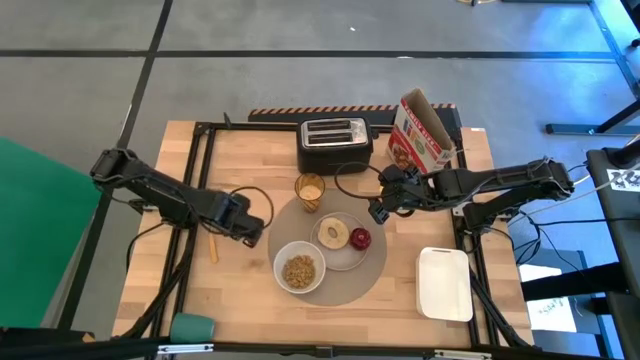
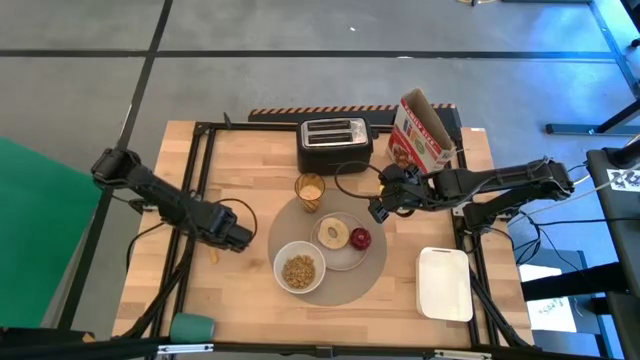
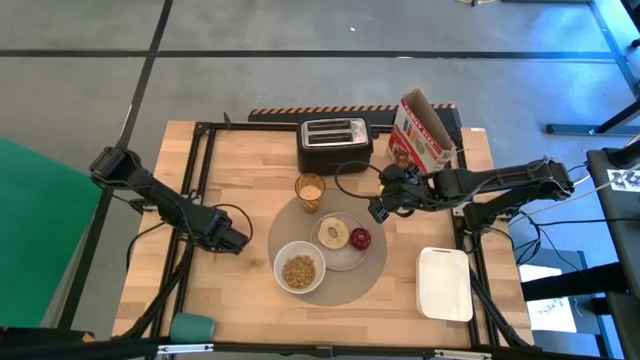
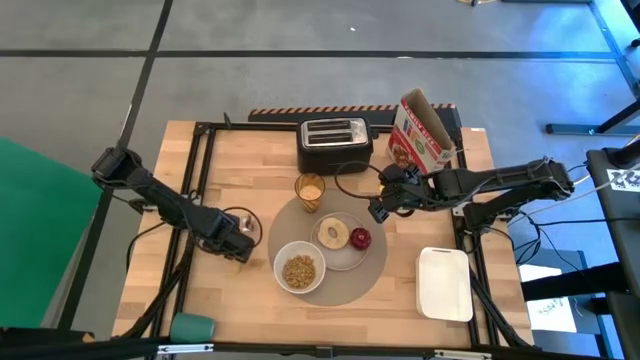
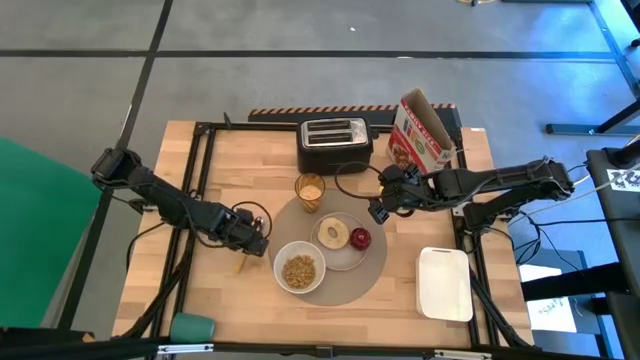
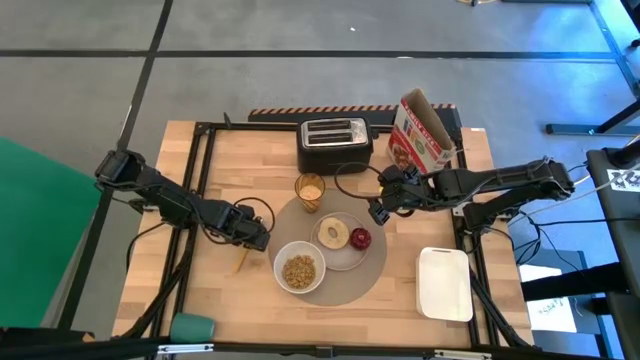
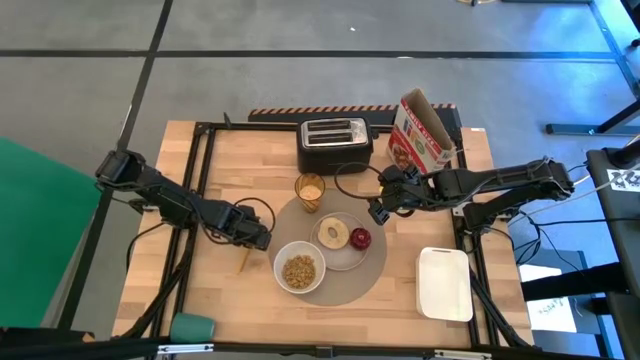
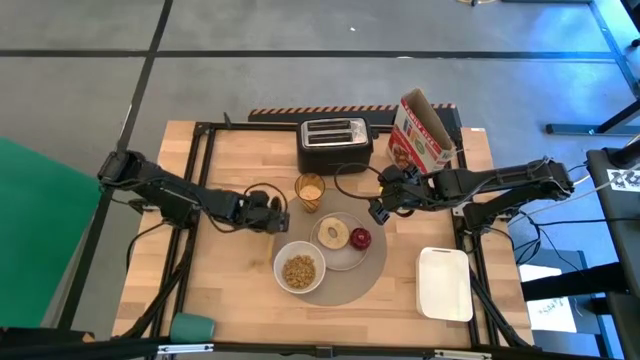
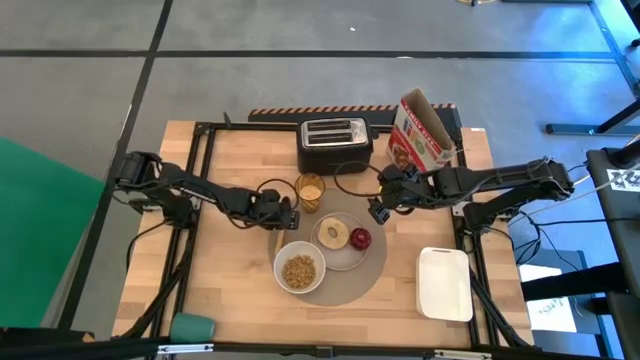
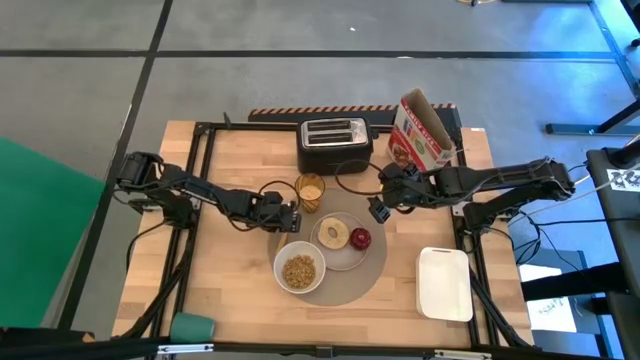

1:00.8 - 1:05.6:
Task: Arrange a breakfast setting
Put the yellow spoon on the gray table mat

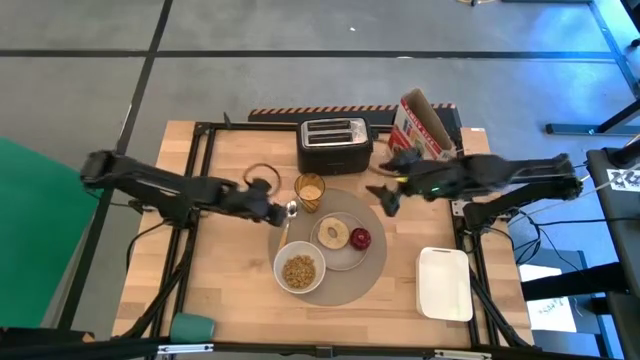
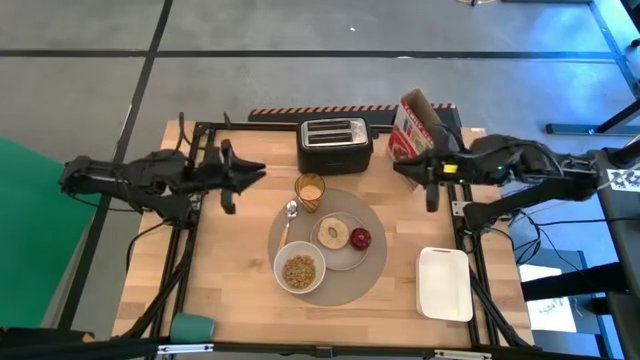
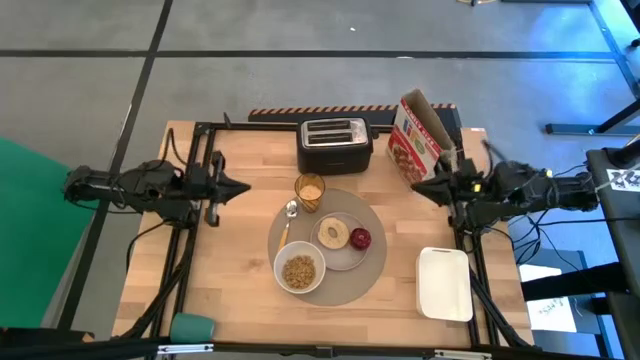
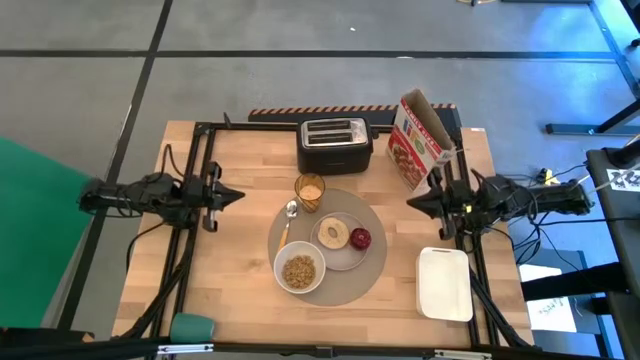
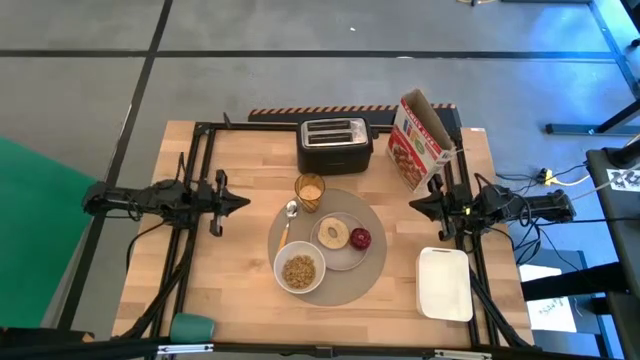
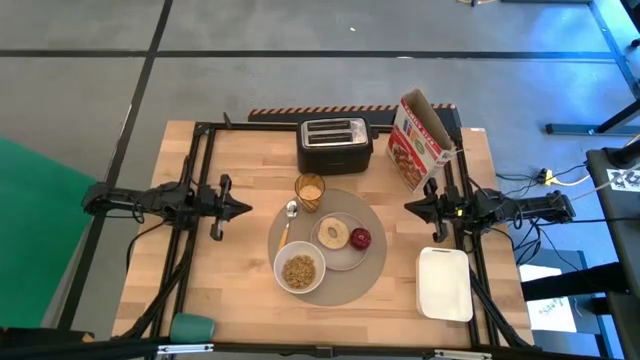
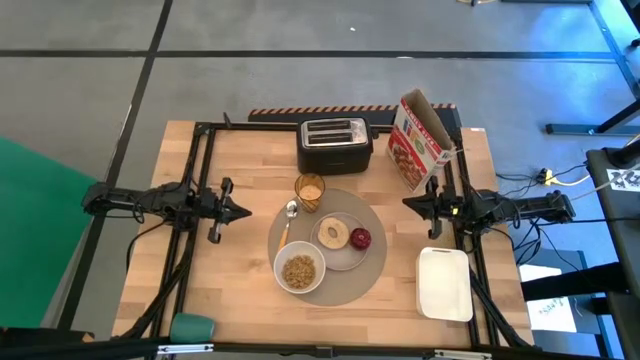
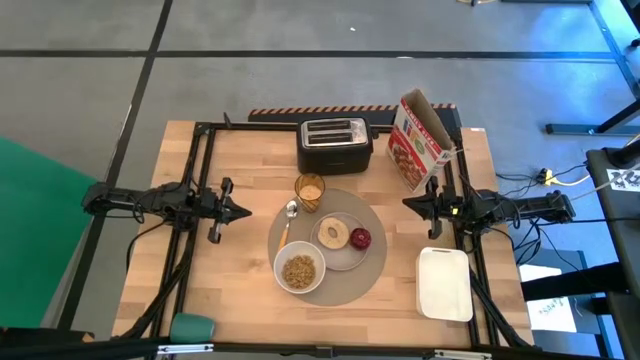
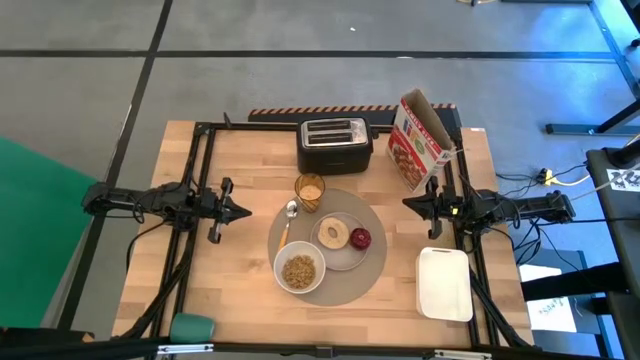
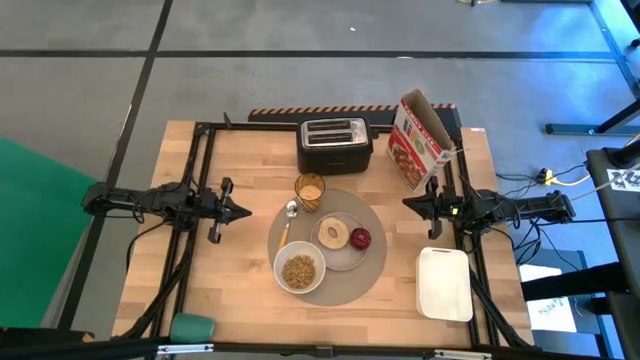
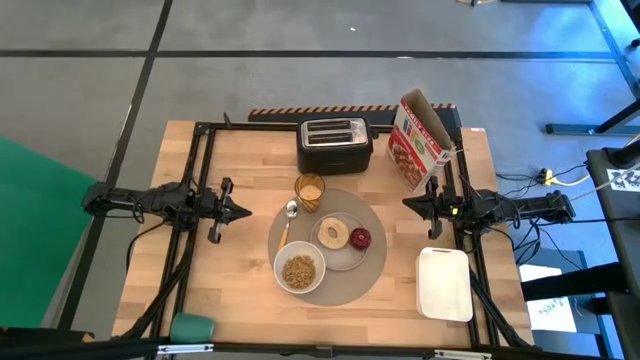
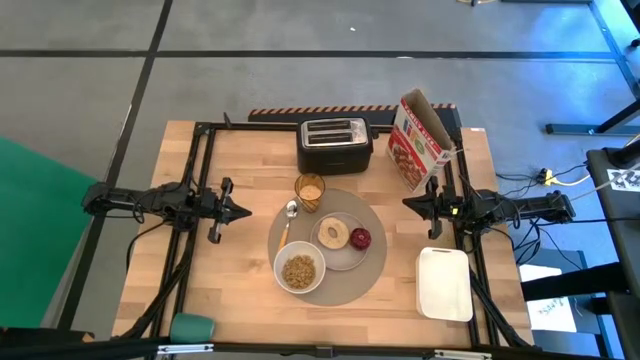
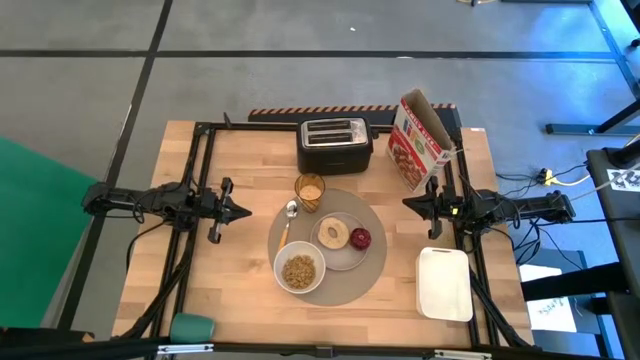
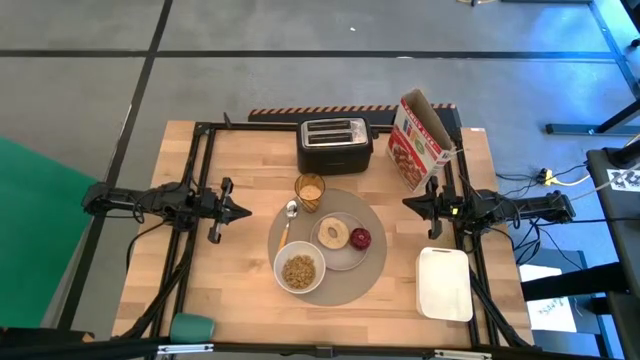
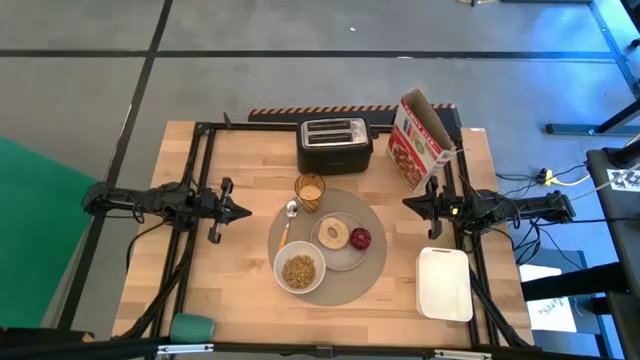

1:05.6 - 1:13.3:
Return to Home Position

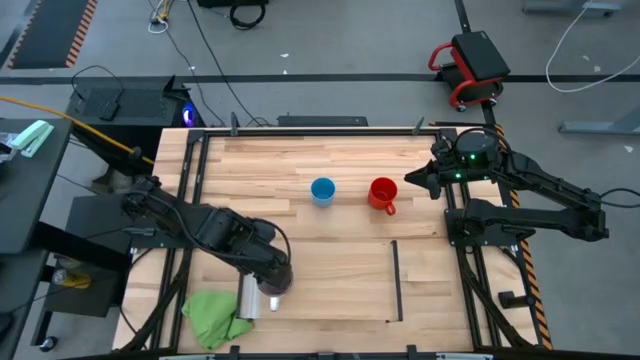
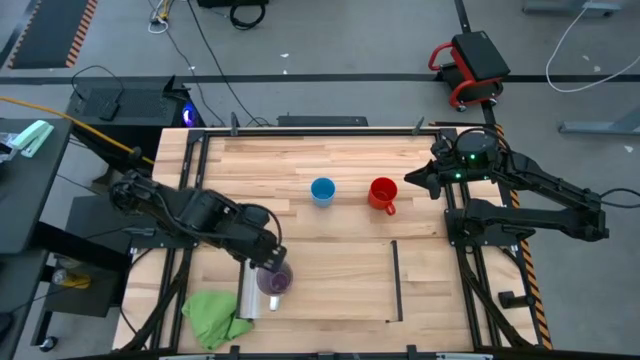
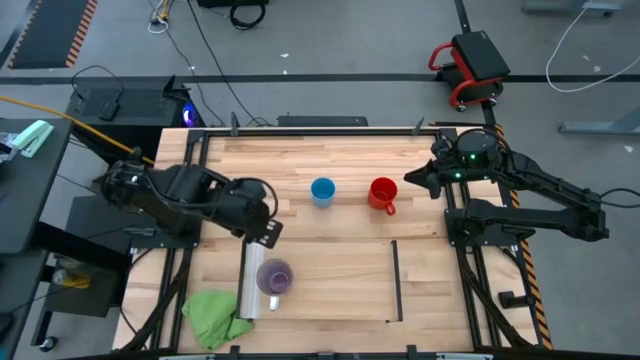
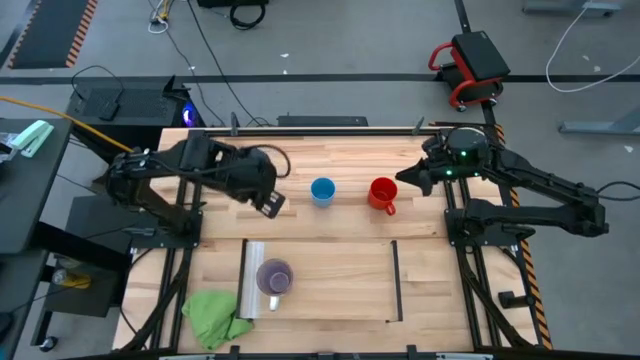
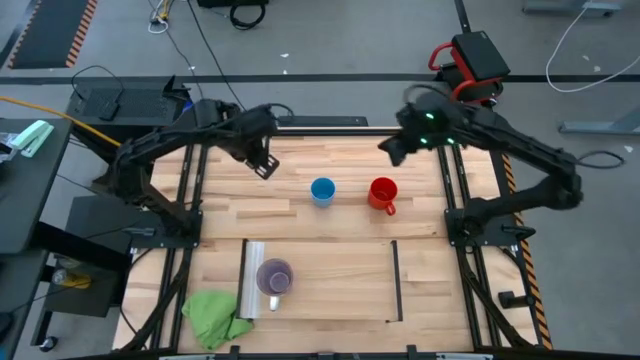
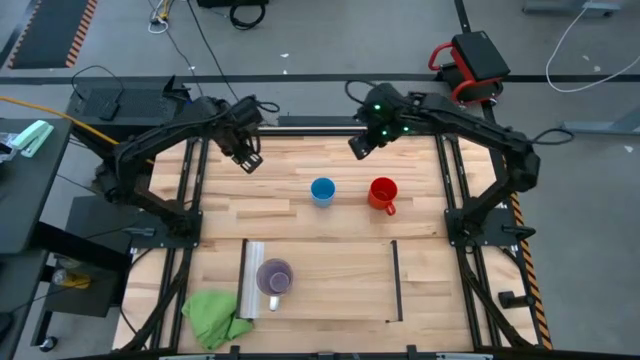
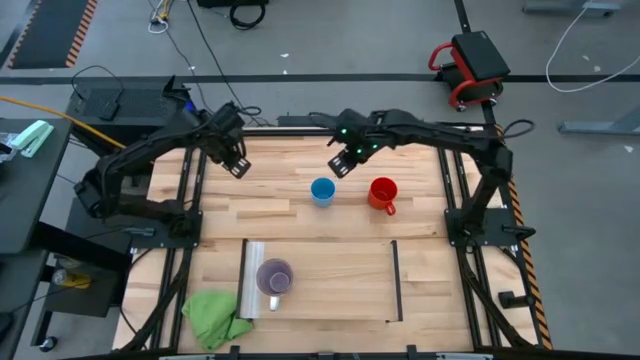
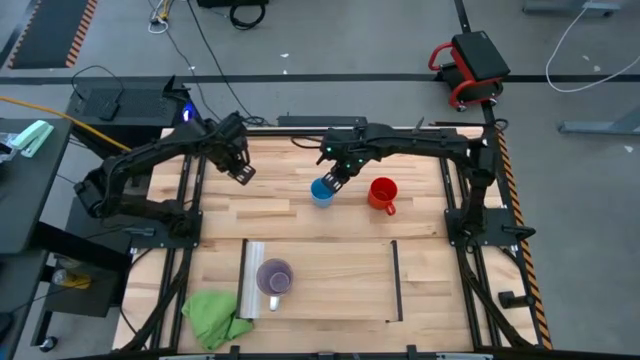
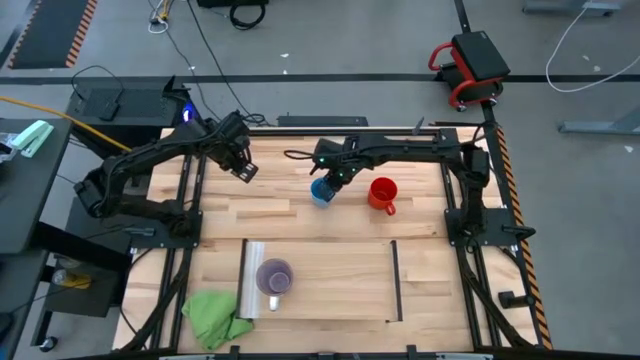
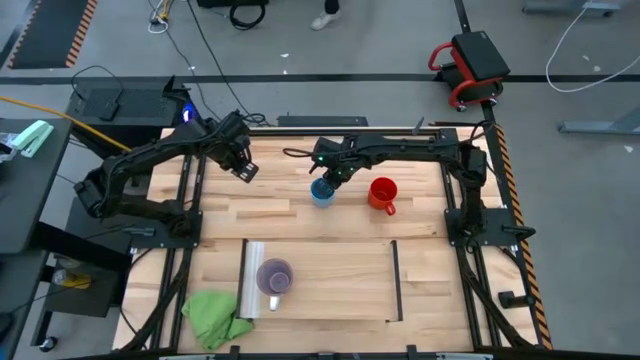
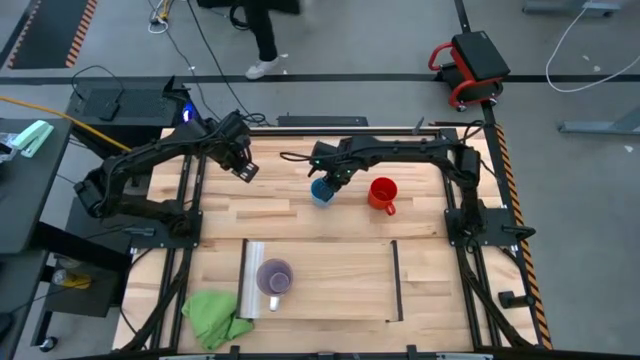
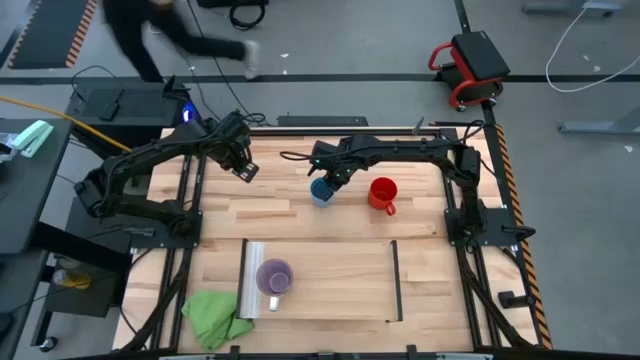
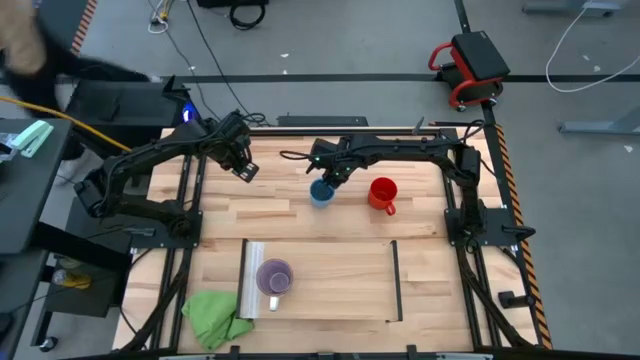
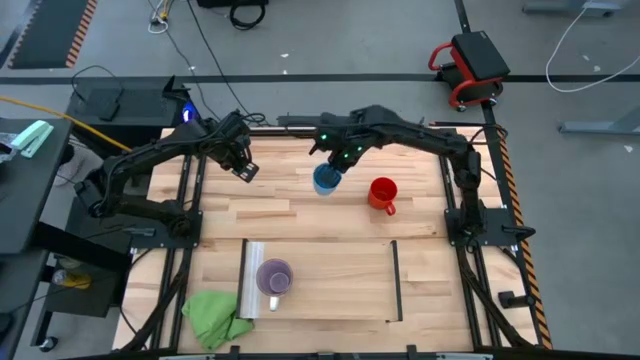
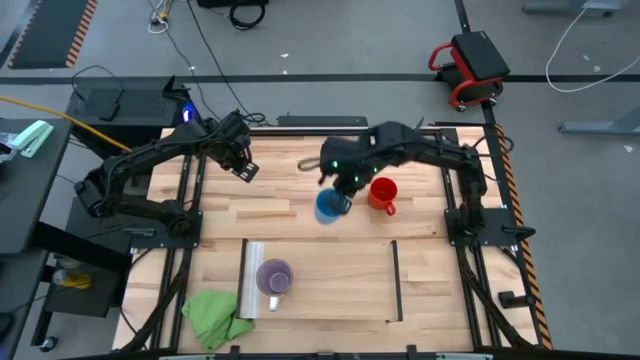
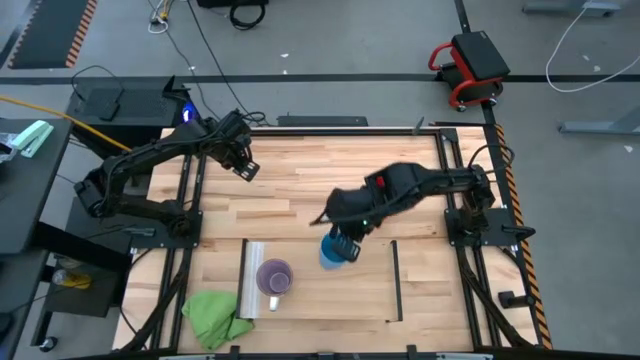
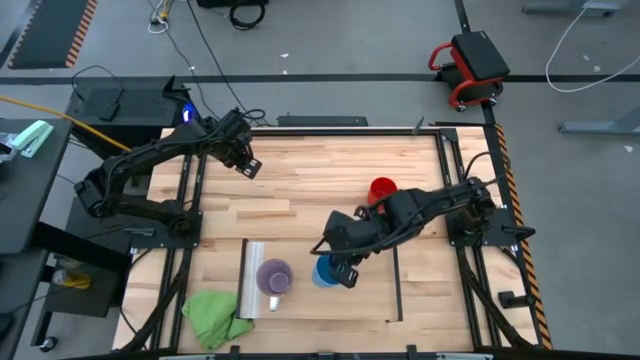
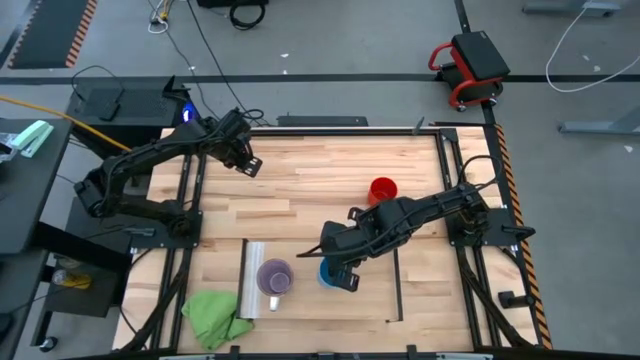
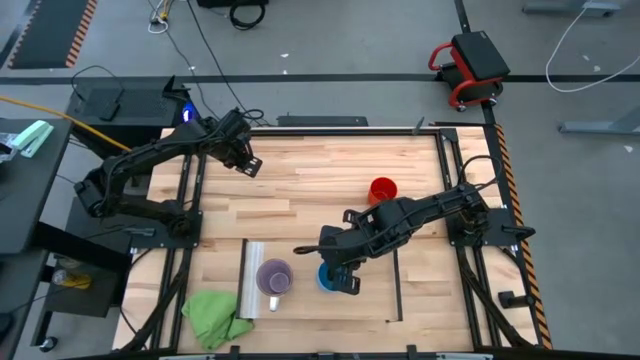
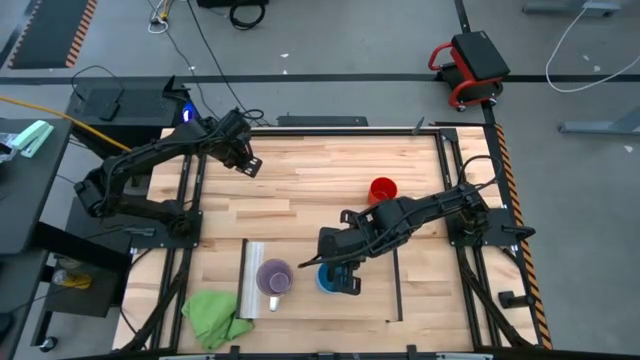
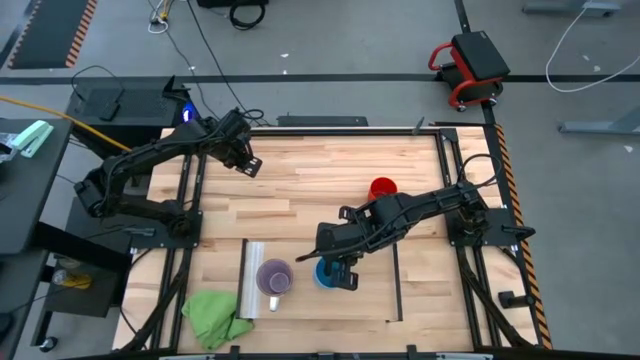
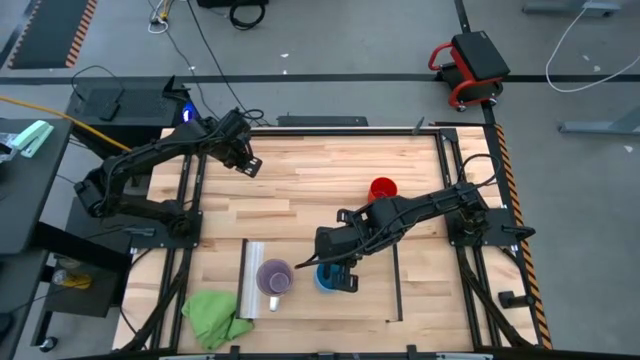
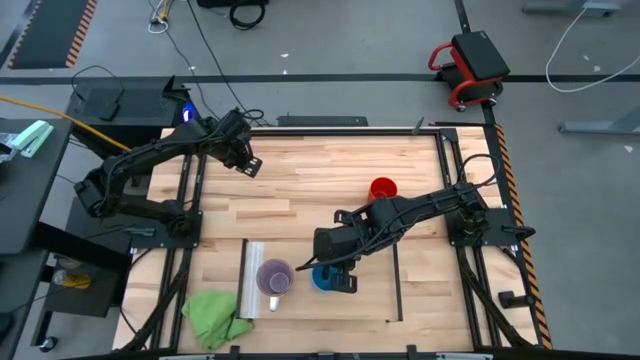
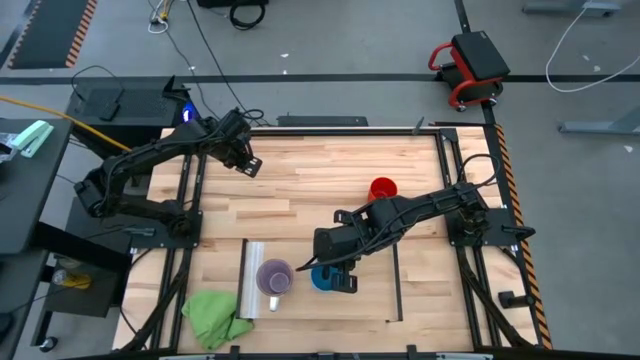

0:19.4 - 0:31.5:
Task: Stack small to large cups/mugs on shelf
Put the blue cup on the shelf
